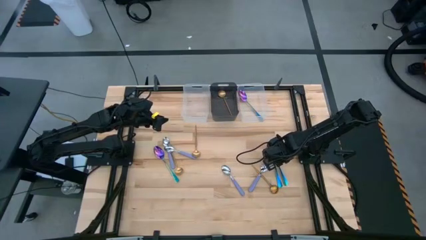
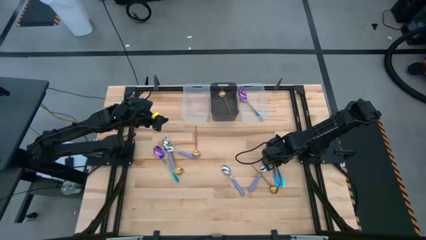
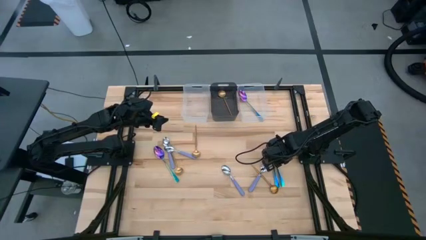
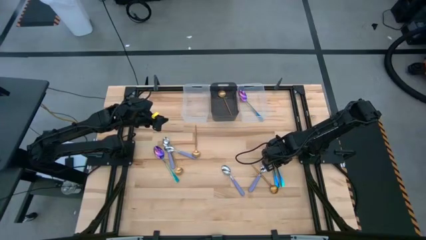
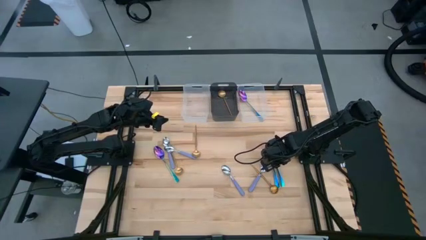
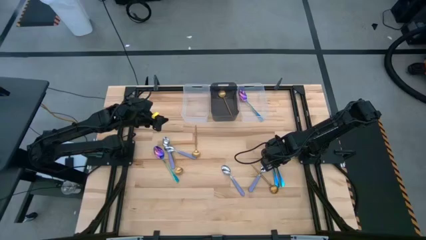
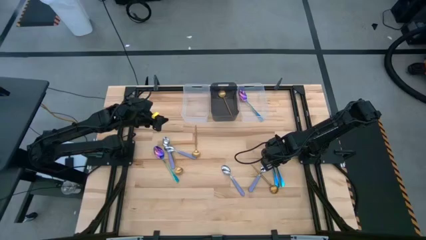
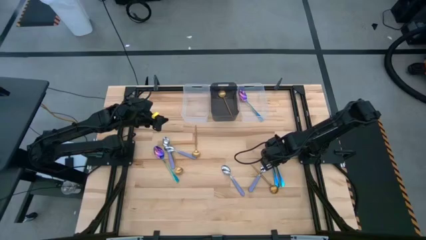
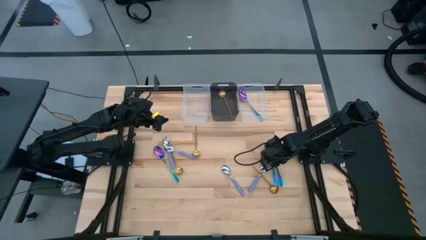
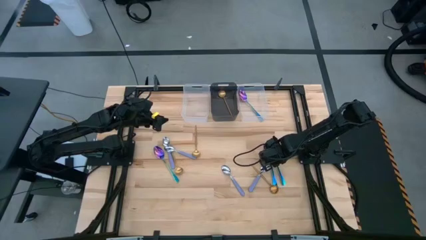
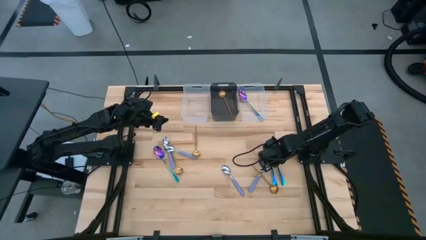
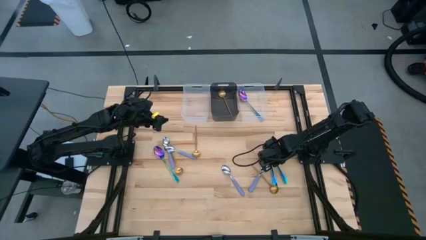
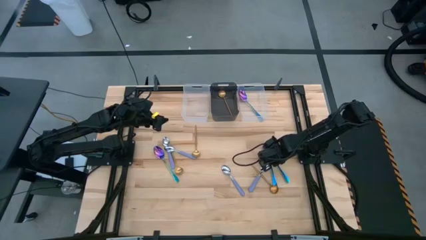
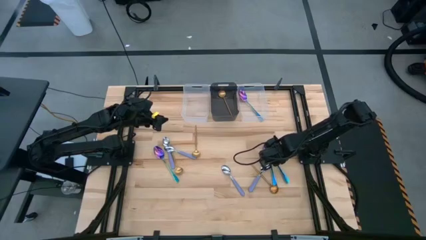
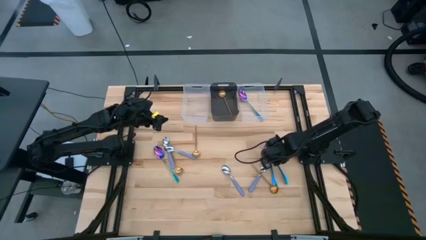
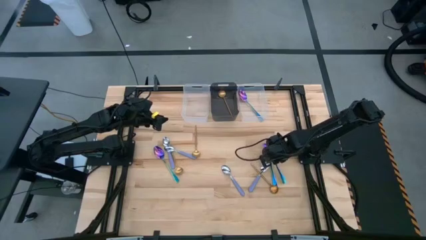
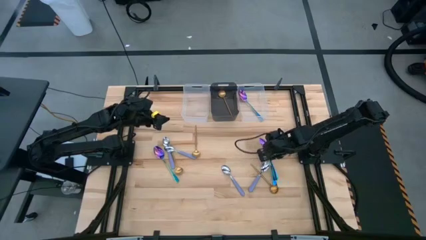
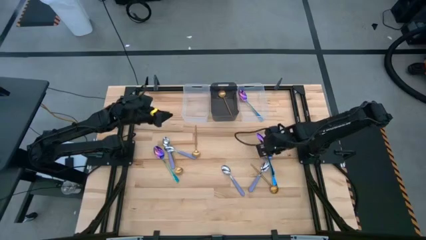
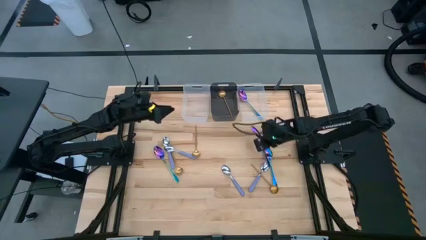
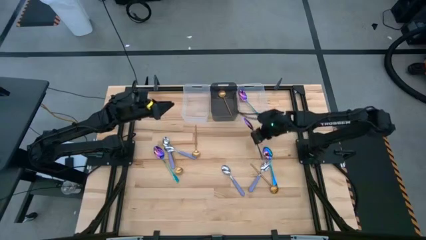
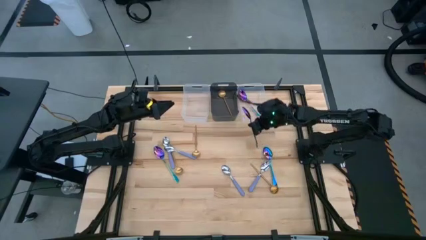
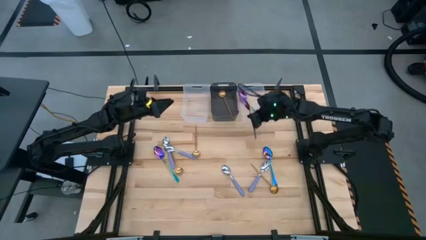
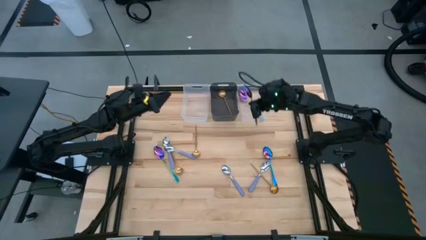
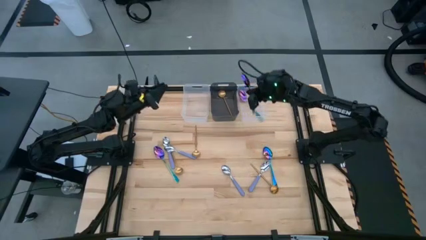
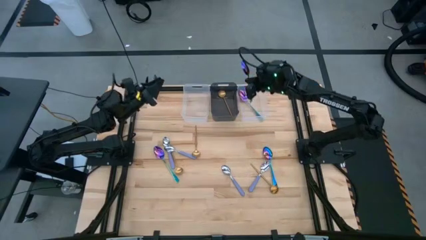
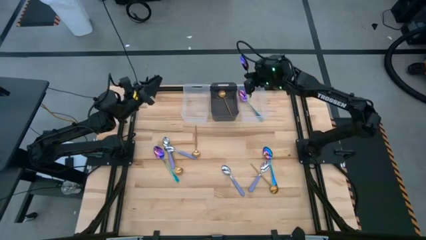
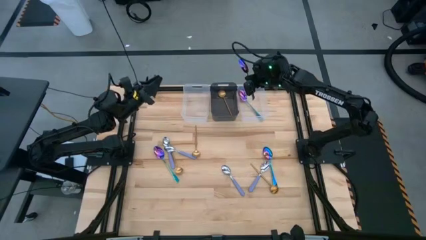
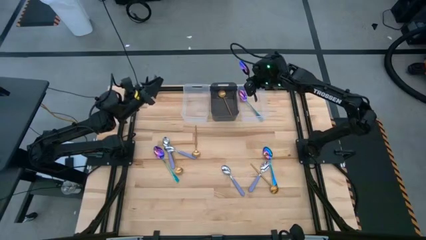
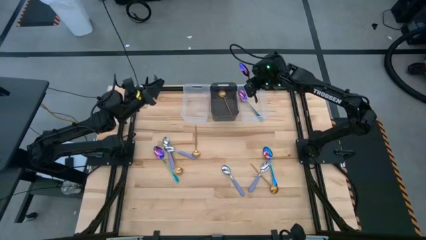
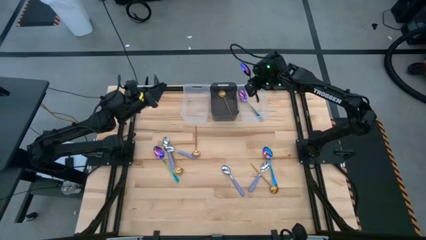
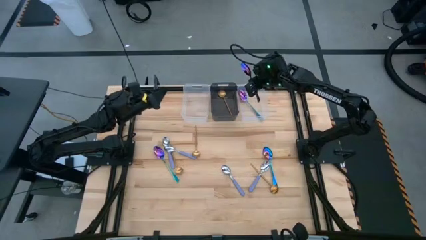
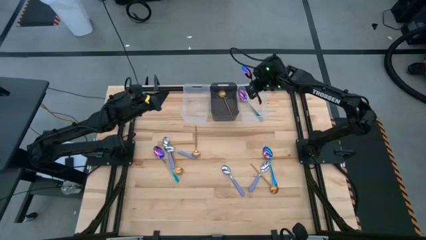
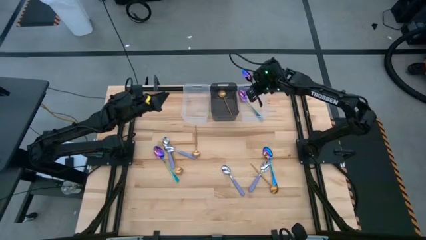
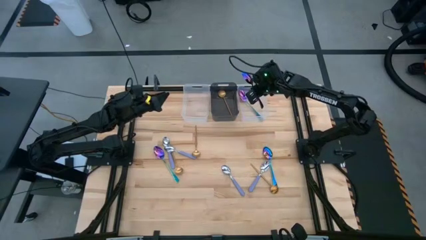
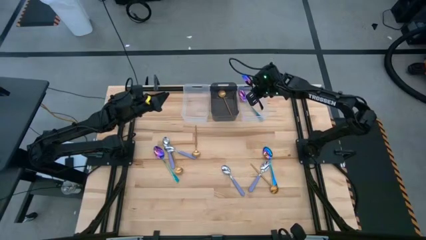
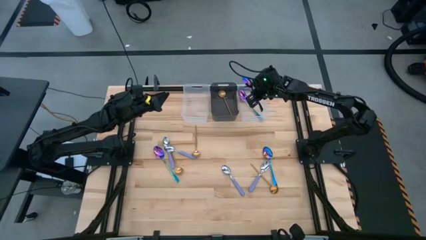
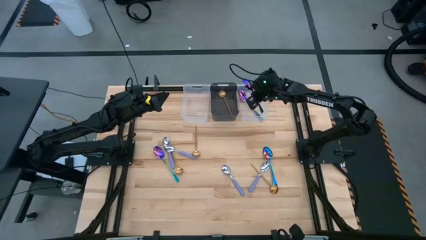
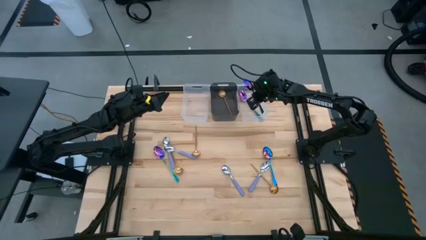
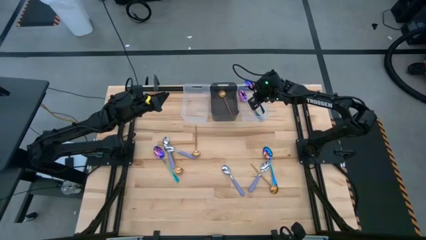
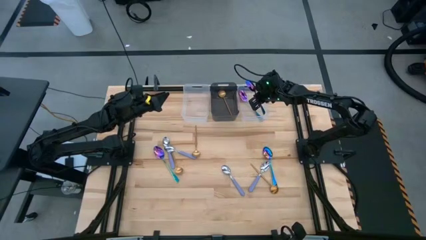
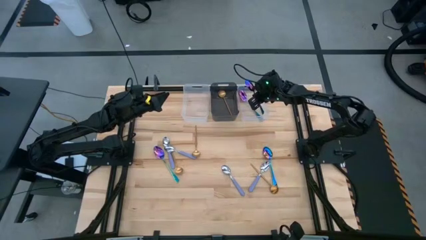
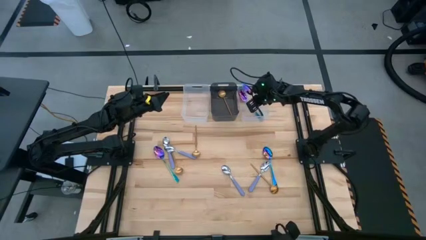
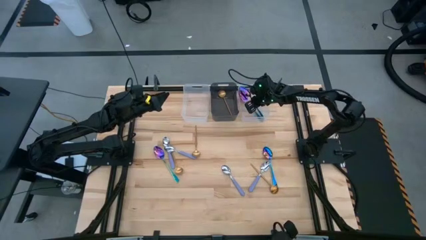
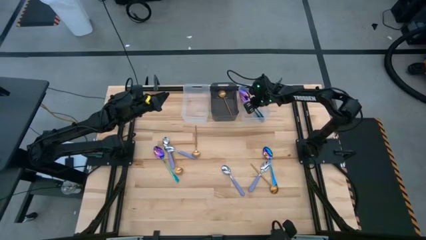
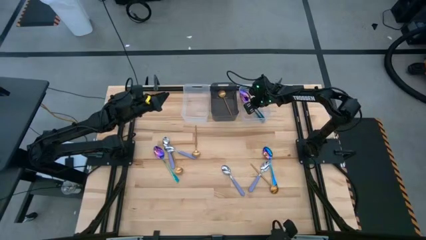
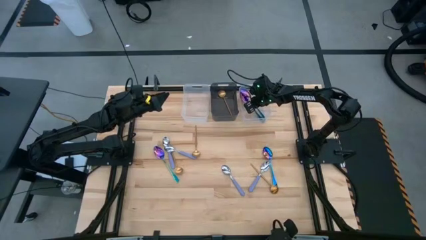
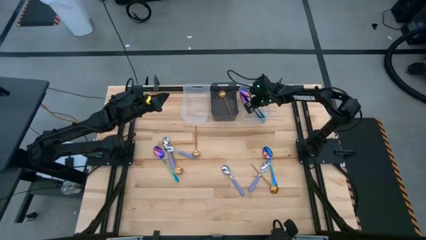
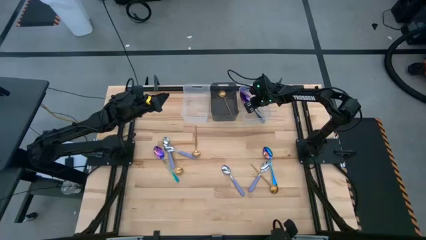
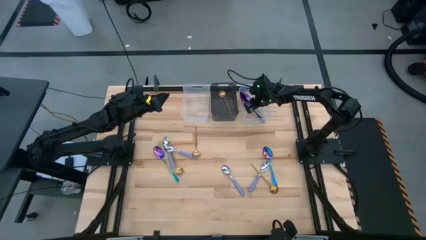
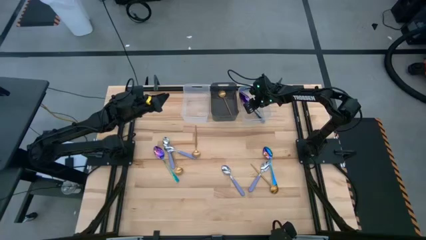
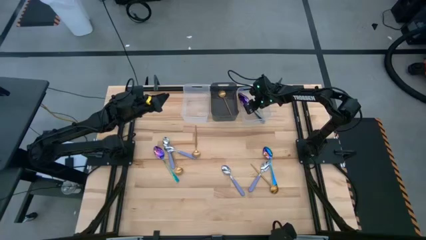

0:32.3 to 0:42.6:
Task: Sort silverware by color (type)
Put the blue spoon into the right transparent bin
